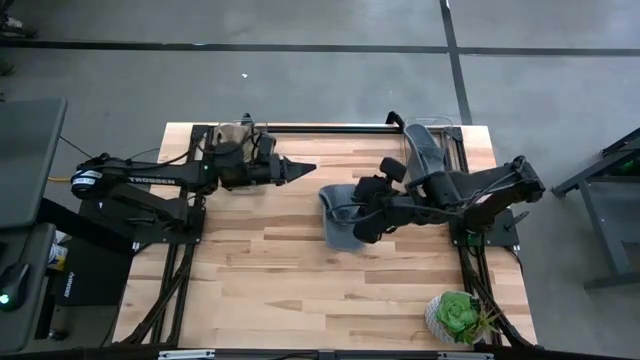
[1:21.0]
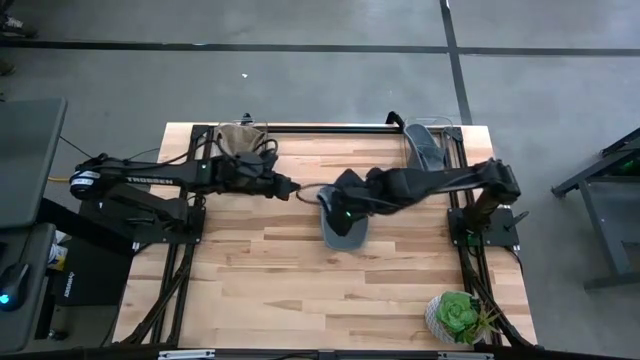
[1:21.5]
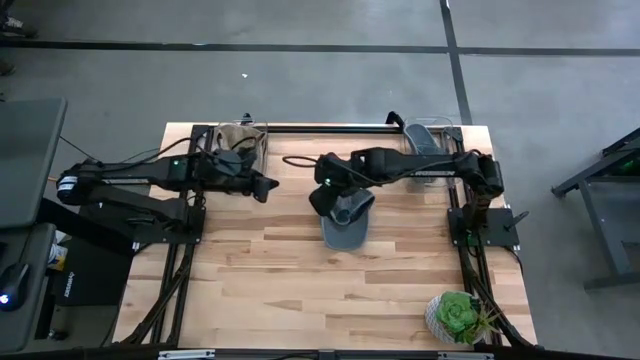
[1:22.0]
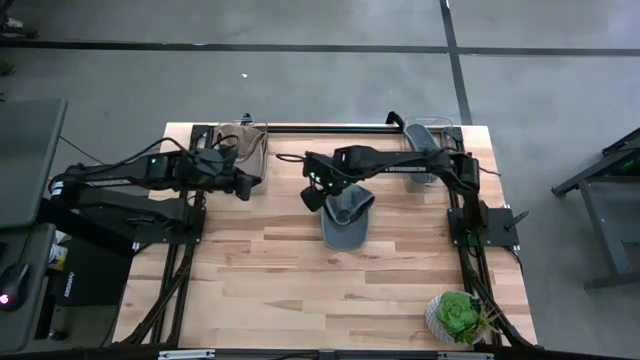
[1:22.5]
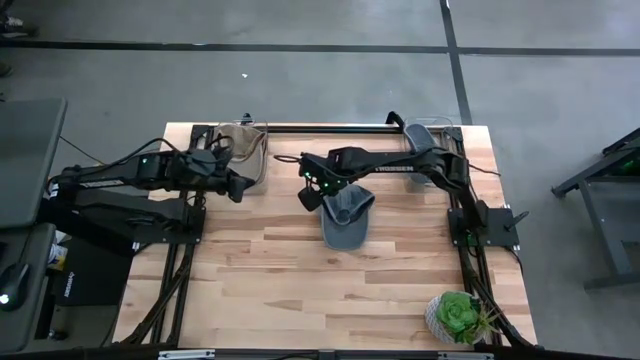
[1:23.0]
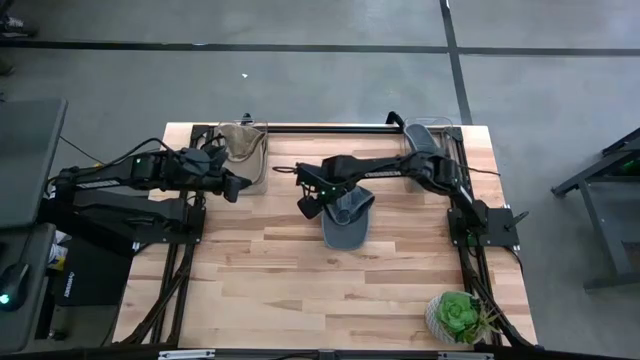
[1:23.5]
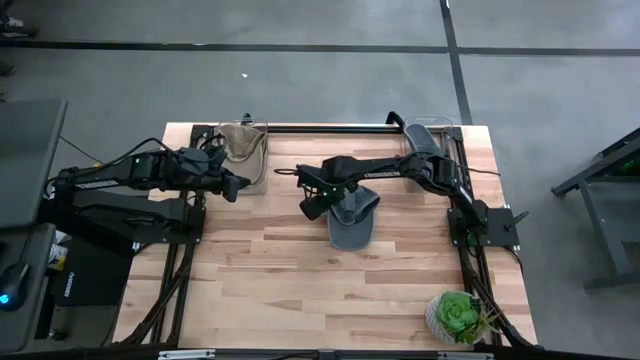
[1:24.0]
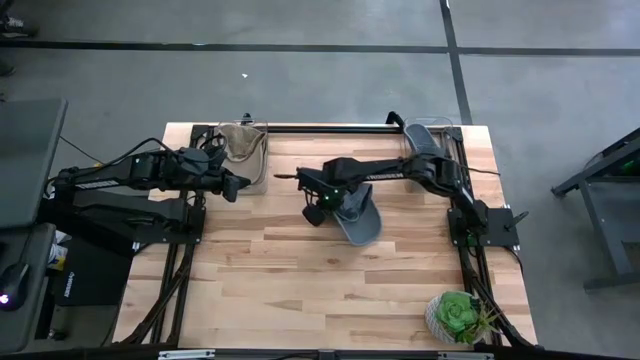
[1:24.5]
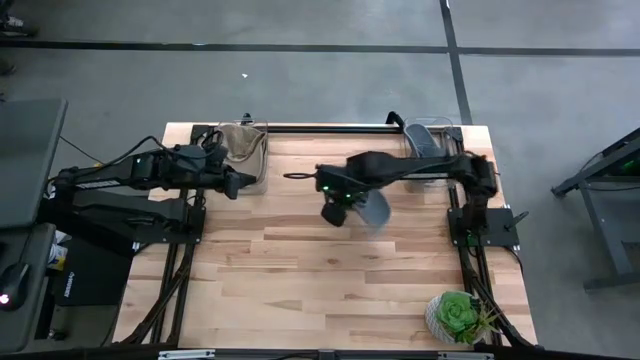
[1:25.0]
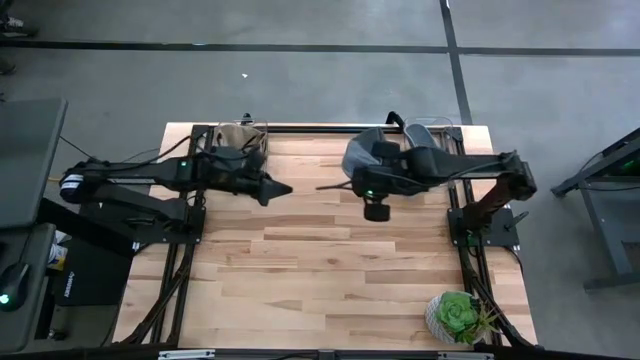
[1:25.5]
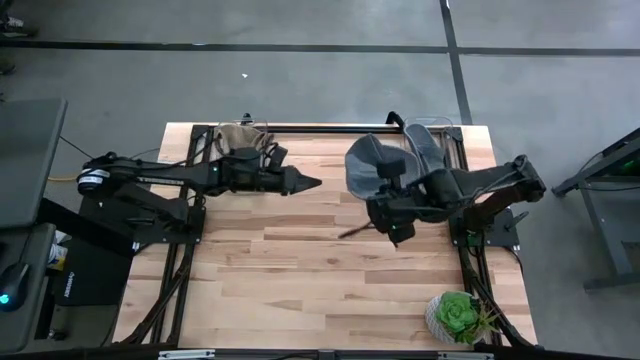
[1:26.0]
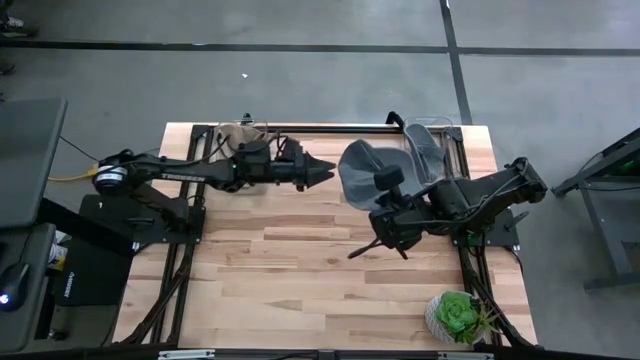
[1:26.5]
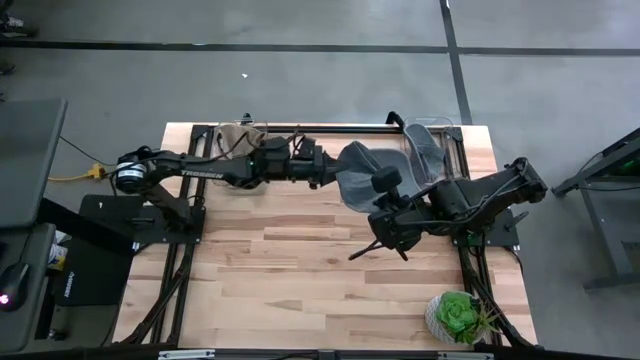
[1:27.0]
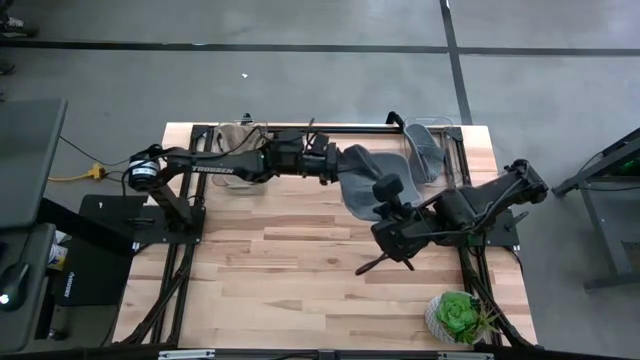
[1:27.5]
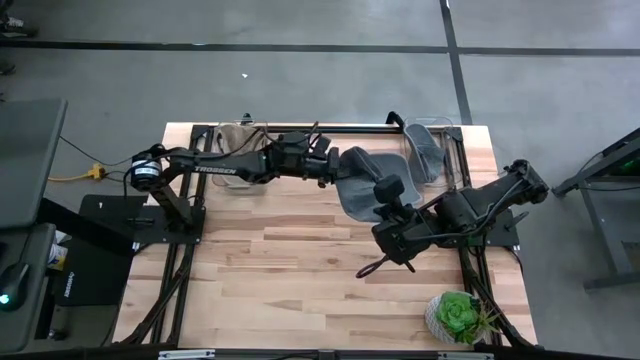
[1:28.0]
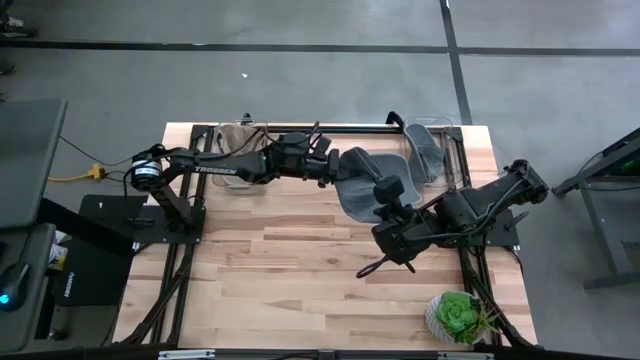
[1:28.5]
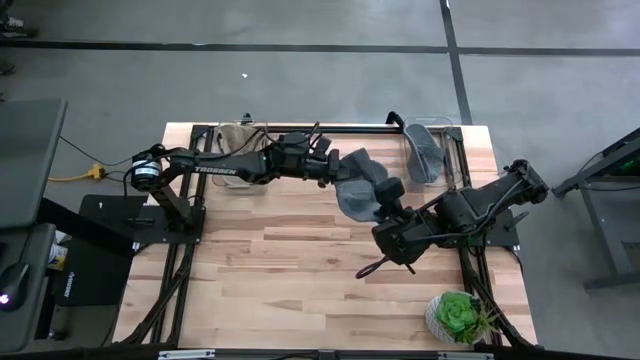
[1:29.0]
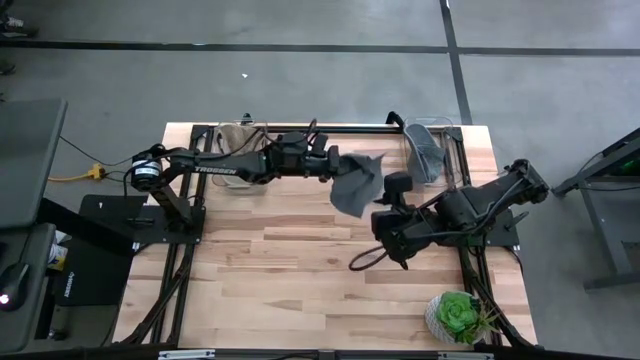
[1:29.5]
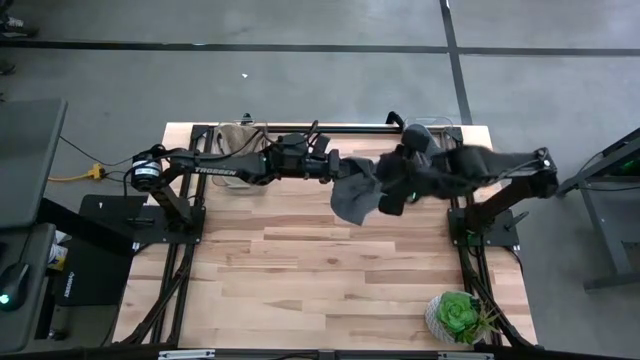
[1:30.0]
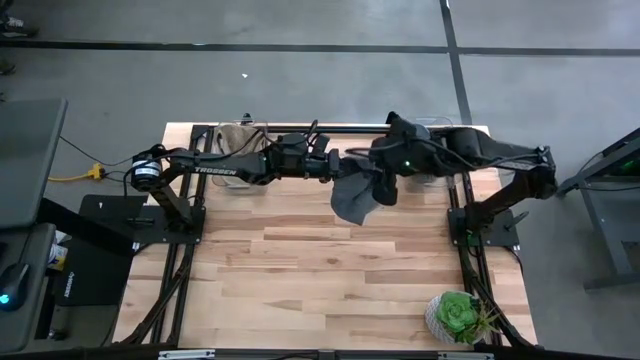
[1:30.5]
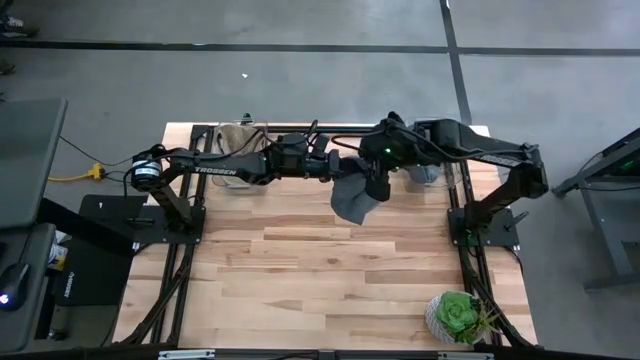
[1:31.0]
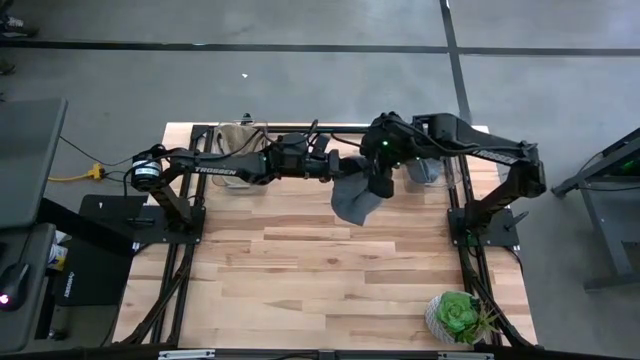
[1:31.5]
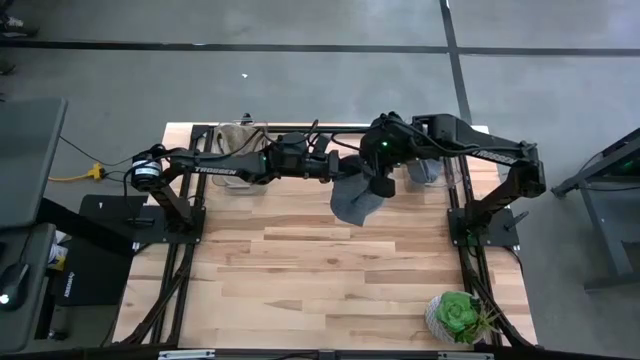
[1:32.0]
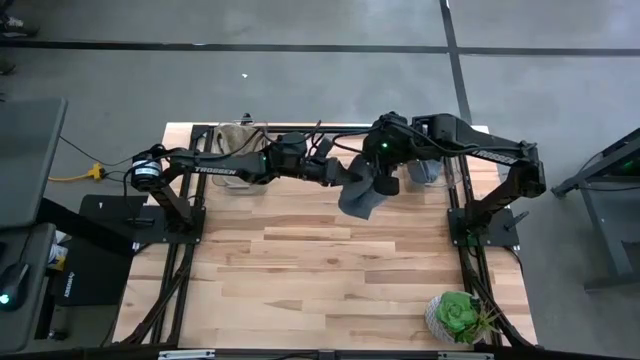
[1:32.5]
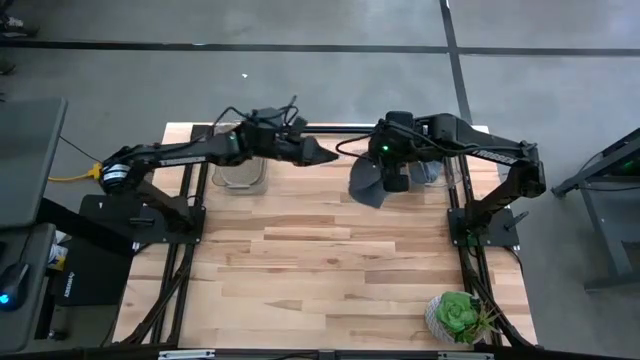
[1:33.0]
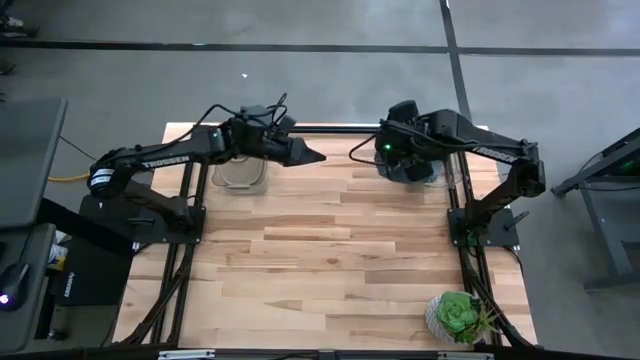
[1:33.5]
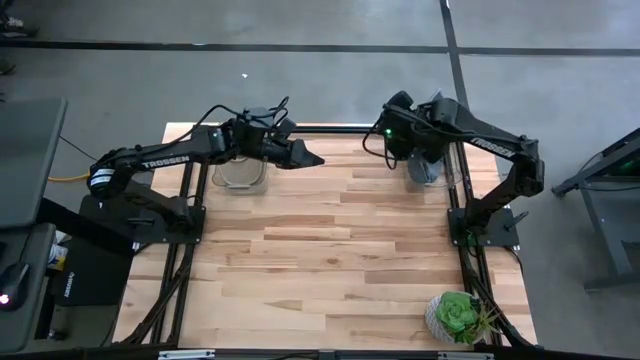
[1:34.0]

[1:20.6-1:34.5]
Task: Pick & Place hat
Put the blue cap into the right transparent bin

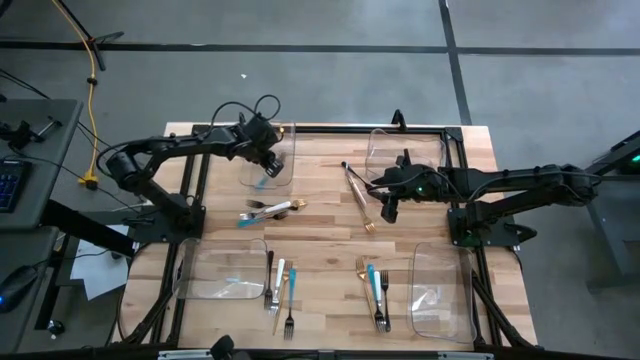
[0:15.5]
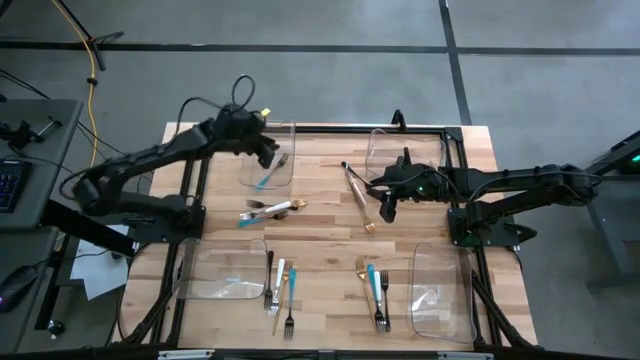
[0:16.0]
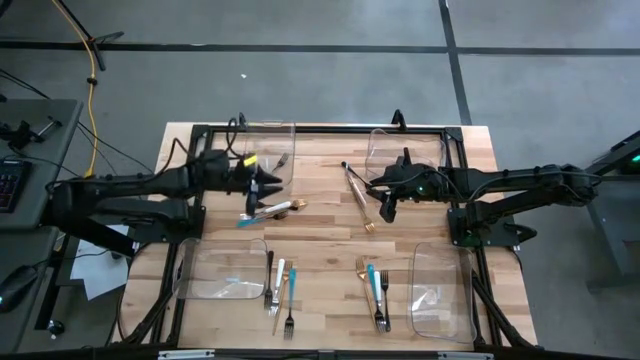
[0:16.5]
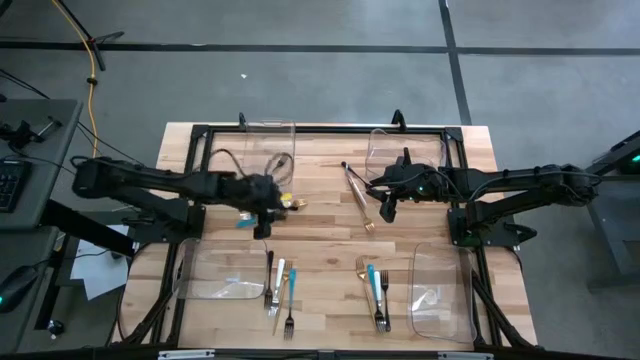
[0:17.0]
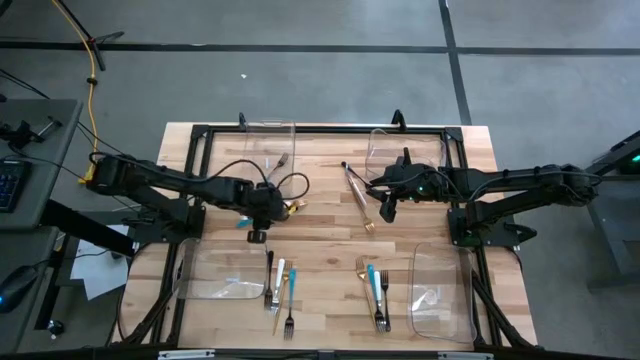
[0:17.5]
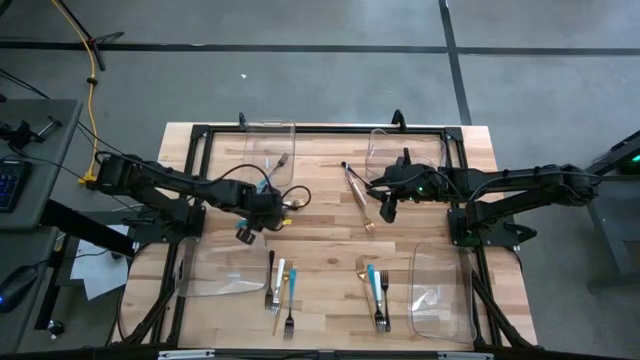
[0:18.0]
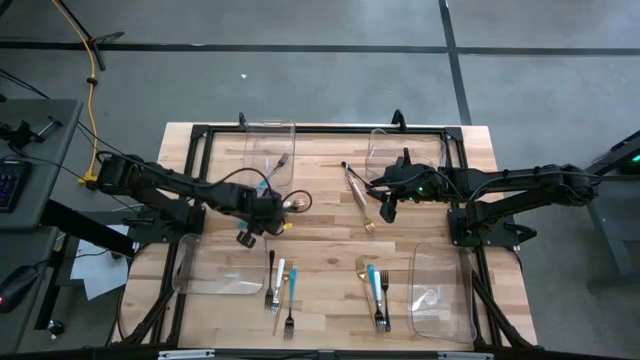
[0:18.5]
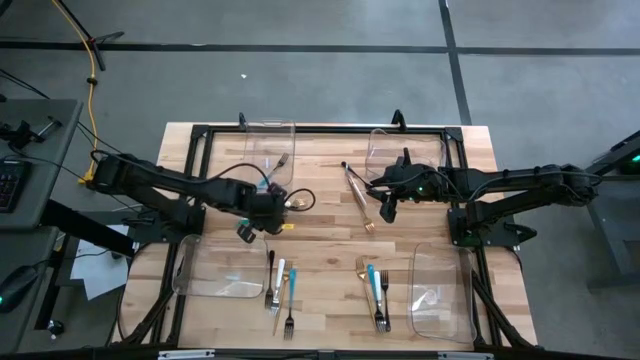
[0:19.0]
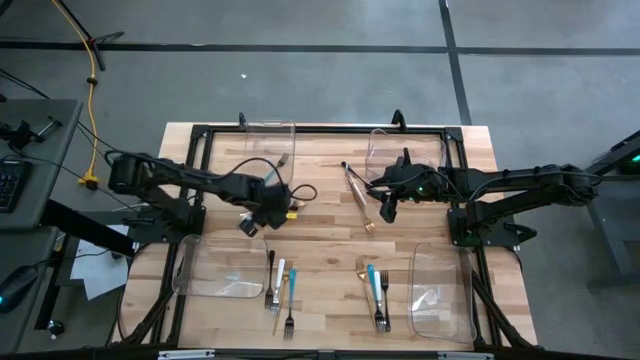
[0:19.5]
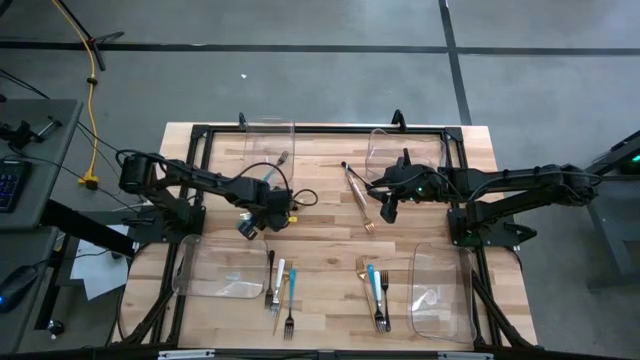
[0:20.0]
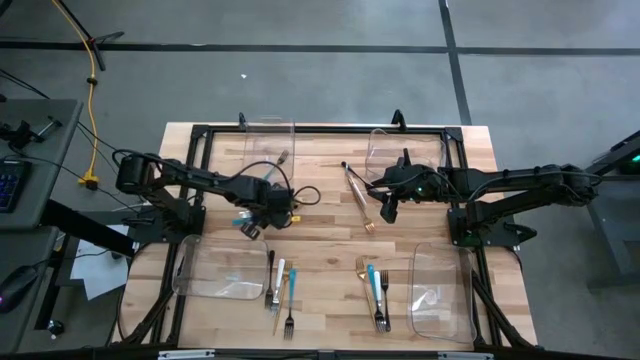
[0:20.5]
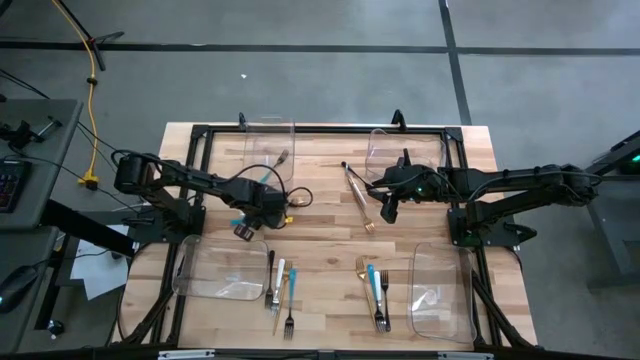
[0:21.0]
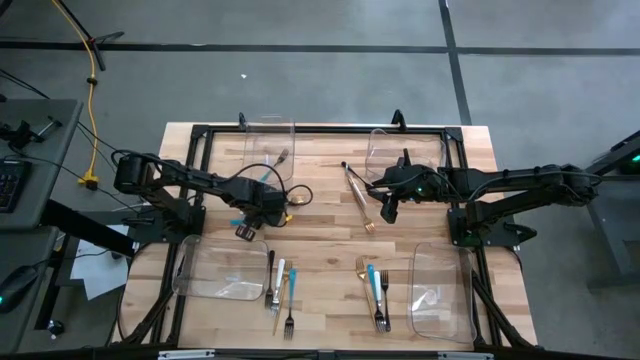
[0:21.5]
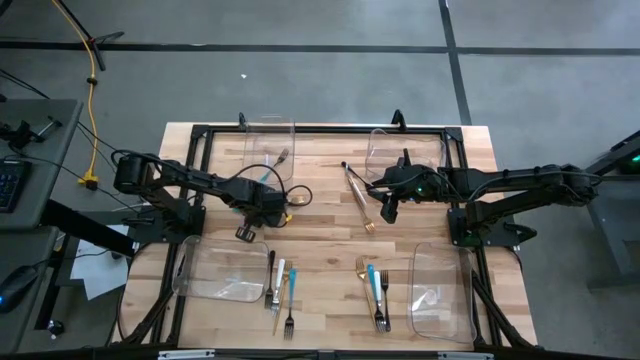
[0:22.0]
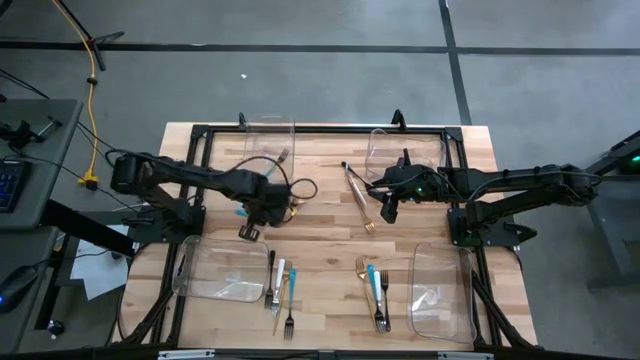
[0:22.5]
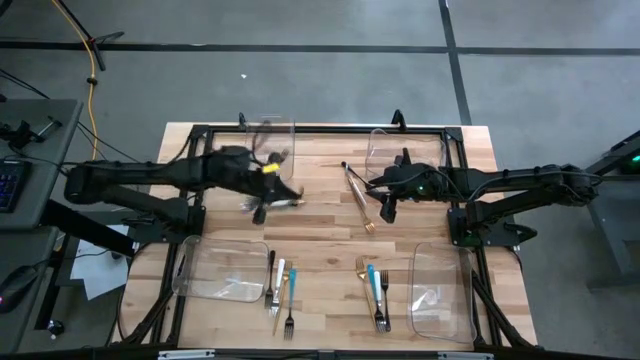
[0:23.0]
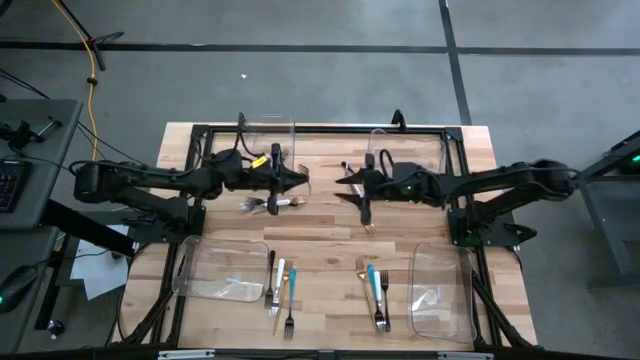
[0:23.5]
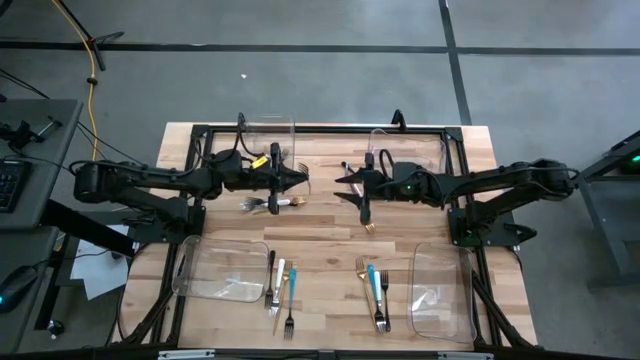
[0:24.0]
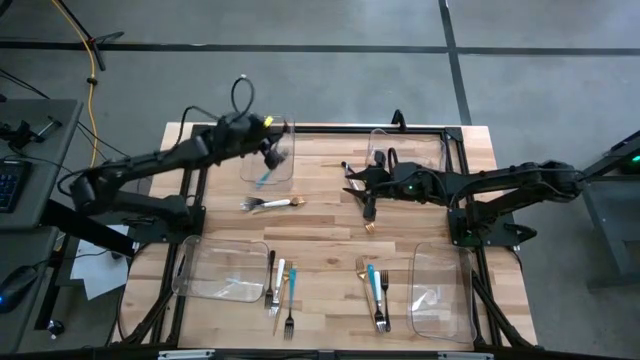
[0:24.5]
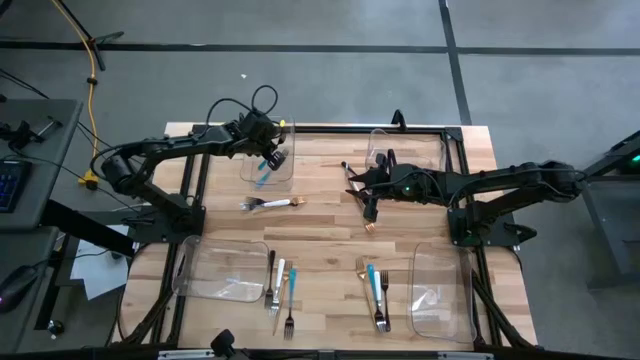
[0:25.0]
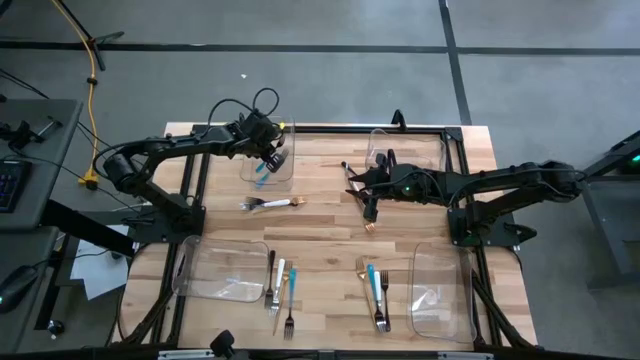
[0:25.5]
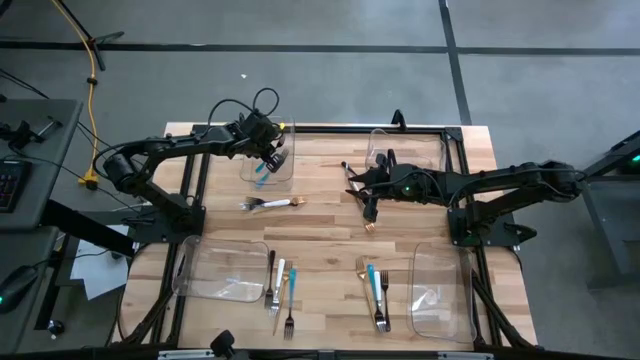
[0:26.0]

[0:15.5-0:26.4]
Task: Sort silverware by color (type)
Put the blue fork into the top left transparent bin
